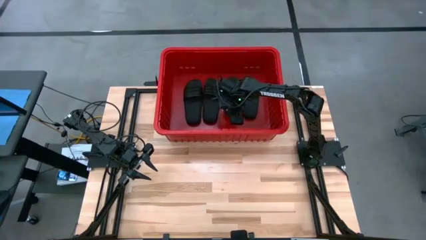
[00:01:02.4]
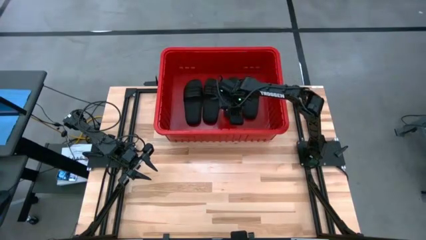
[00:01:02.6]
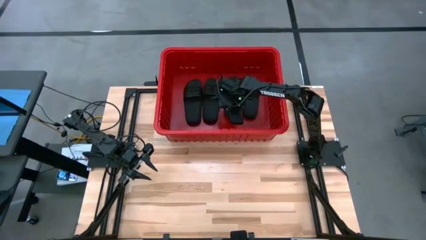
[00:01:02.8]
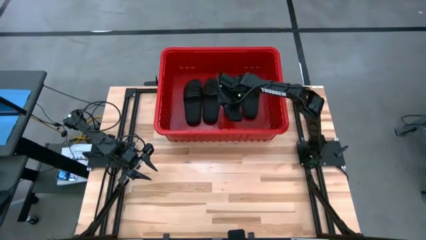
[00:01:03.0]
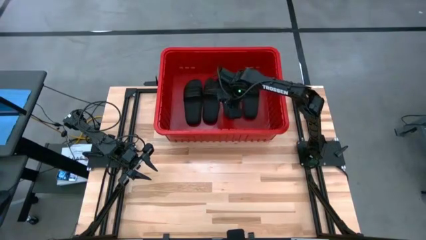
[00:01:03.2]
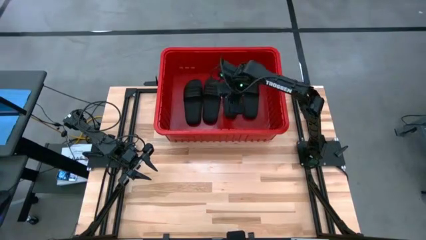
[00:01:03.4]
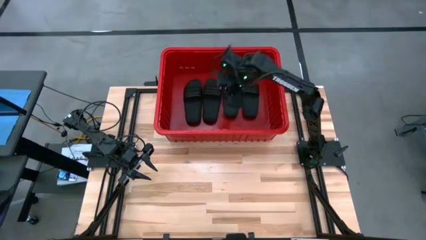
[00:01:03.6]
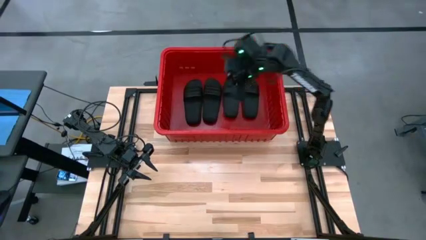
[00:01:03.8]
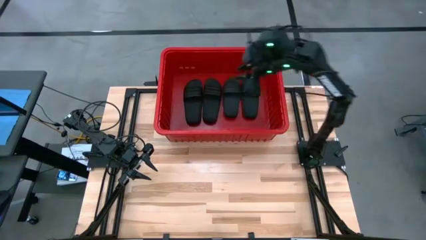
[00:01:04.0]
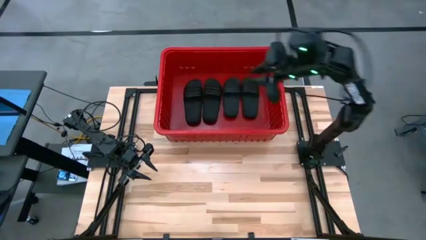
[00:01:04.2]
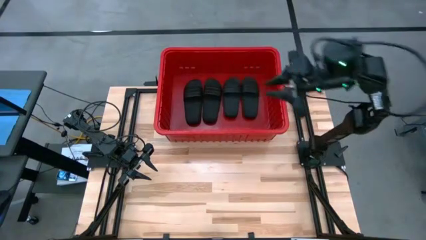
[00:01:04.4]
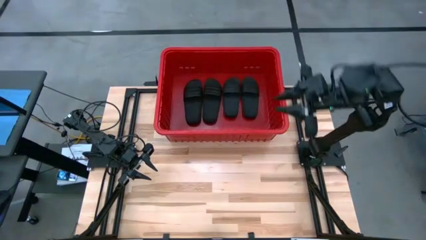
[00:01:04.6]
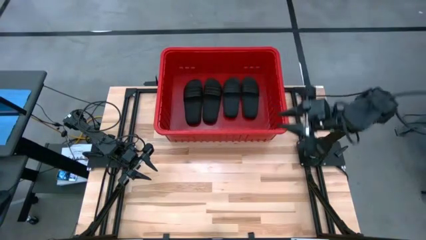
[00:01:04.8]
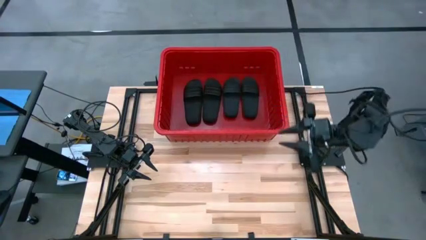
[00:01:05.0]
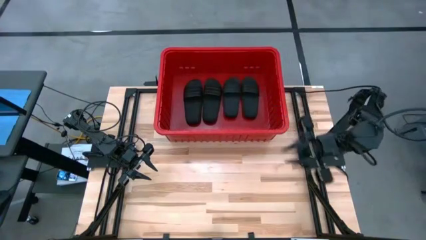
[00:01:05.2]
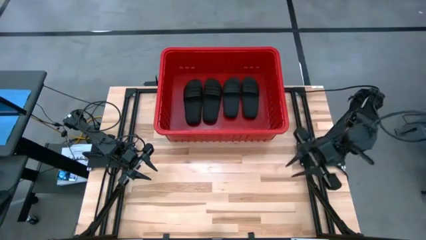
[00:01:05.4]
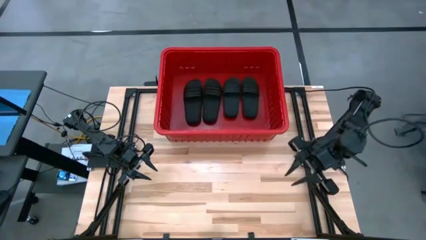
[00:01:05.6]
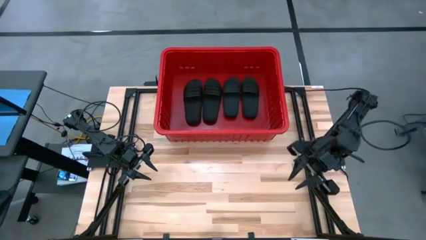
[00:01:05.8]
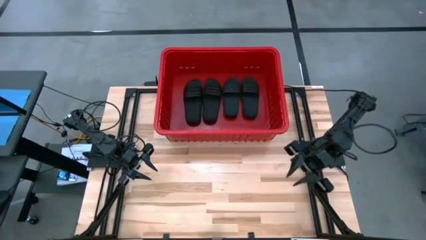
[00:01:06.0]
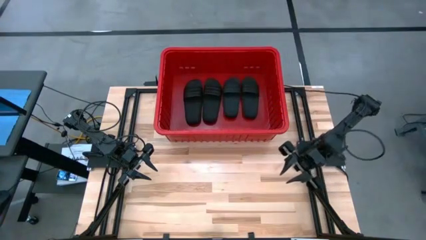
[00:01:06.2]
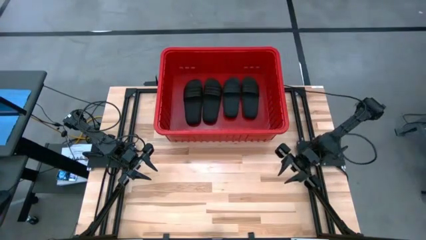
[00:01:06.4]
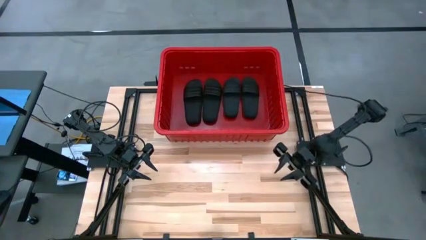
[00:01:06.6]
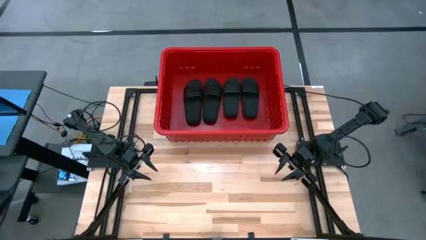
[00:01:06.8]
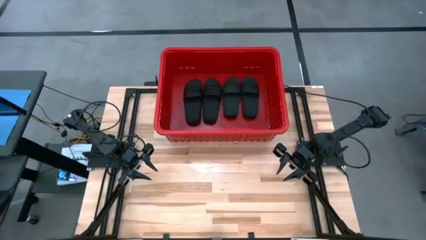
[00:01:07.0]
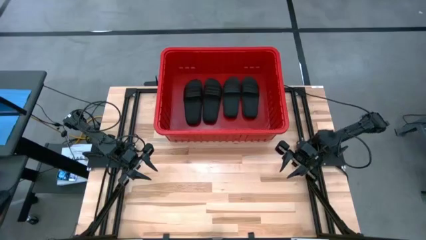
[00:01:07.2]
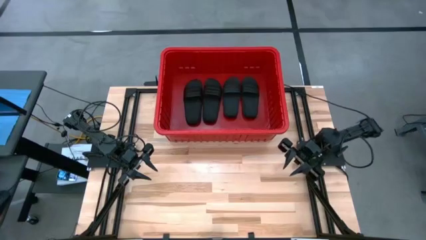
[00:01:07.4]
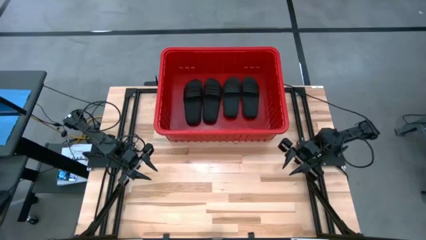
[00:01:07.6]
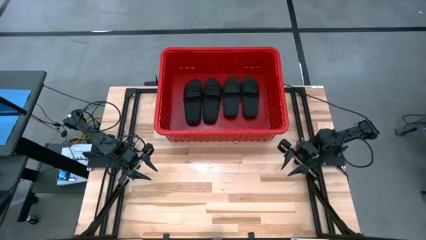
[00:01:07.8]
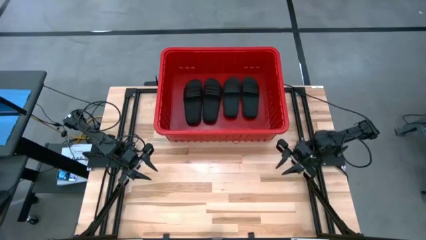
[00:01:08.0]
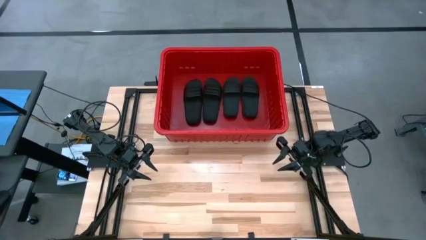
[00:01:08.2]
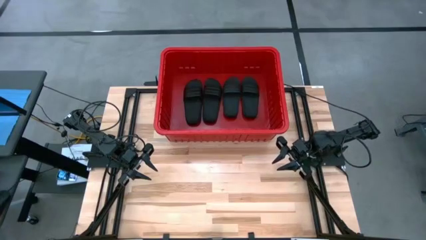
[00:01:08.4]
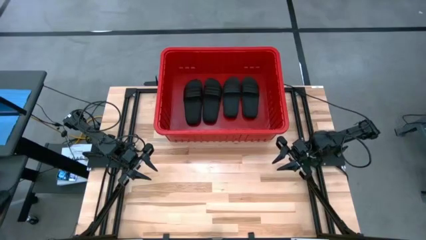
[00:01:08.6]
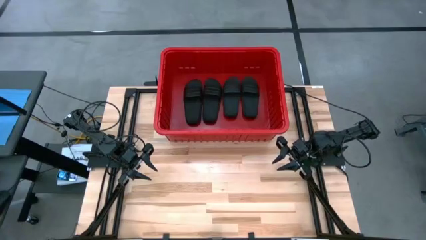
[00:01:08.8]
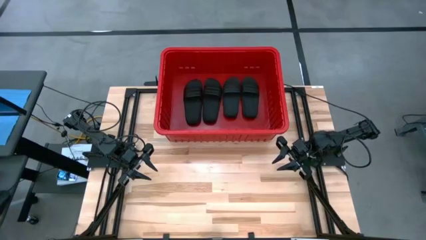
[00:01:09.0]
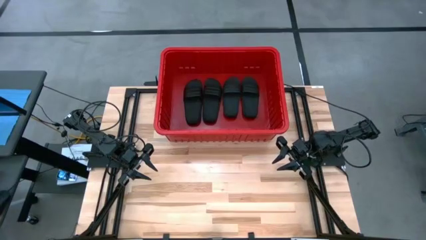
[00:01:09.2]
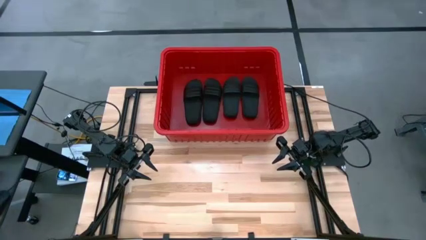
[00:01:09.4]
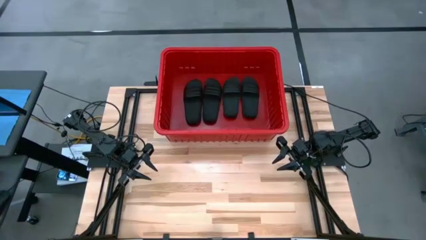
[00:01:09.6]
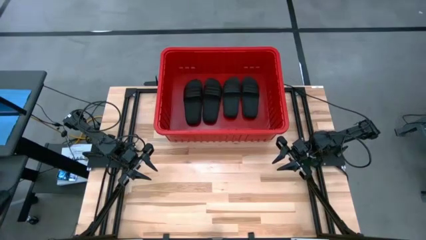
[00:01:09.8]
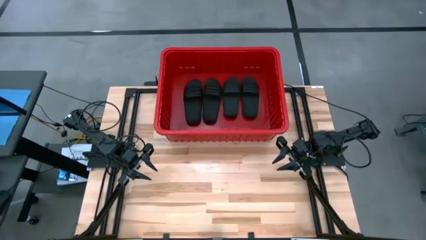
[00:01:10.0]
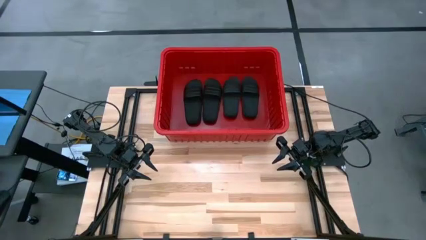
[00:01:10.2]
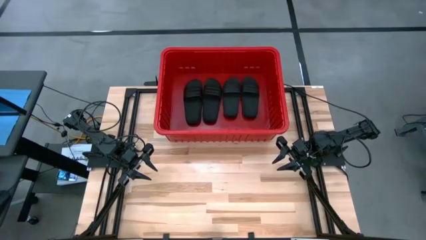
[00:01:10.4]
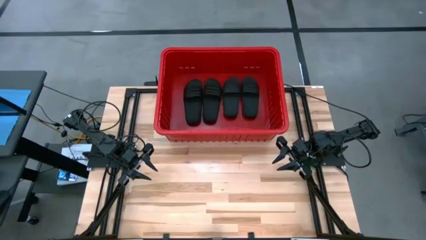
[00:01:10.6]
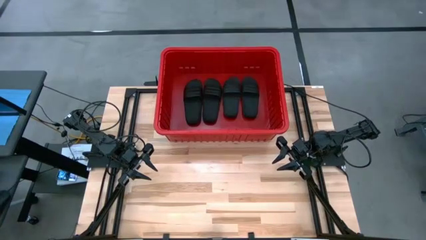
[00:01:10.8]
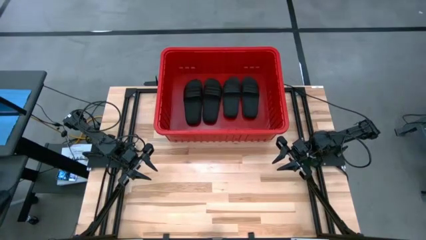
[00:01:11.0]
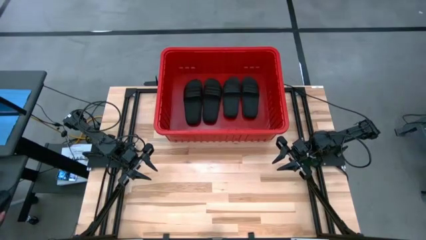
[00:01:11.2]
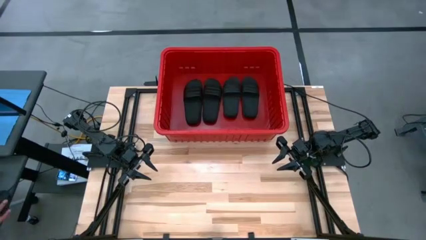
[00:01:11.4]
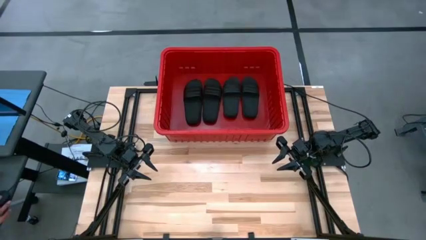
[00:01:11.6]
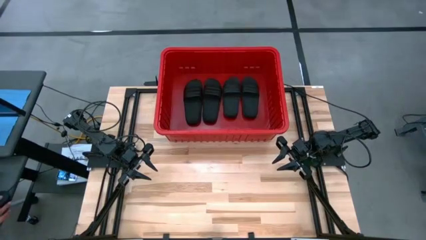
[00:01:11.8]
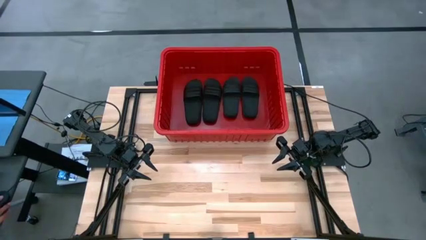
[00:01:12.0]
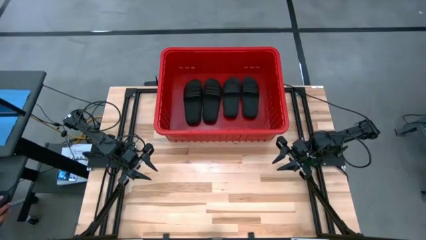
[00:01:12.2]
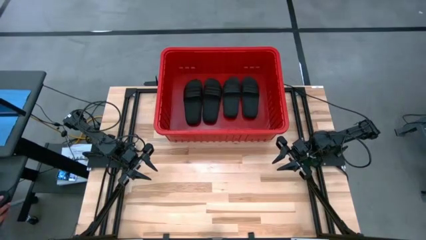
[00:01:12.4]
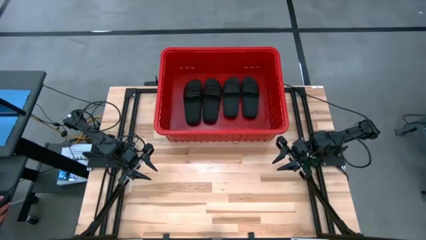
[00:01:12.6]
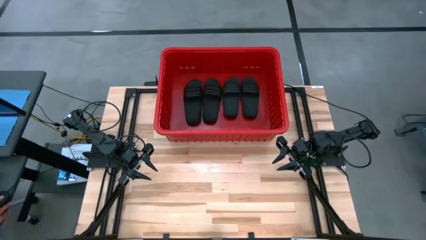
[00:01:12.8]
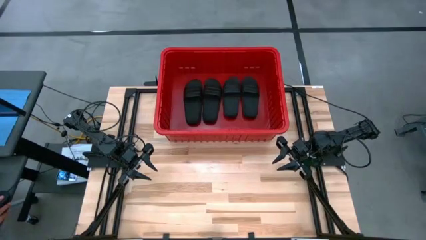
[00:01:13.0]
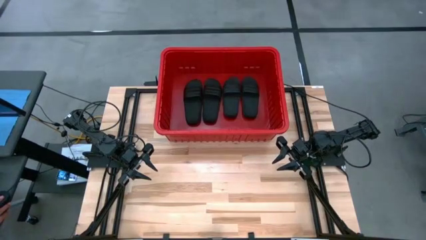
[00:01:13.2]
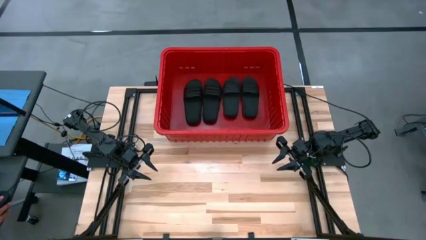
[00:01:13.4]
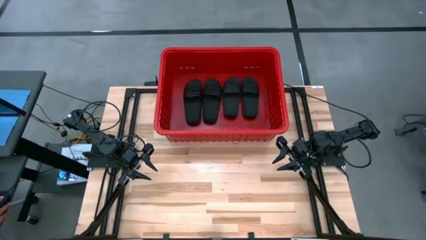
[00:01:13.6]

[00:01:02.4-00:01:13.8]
Task: Pick and place slides into bin
Return to Home Position
